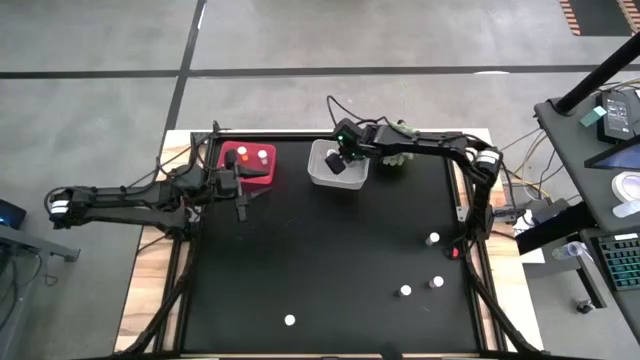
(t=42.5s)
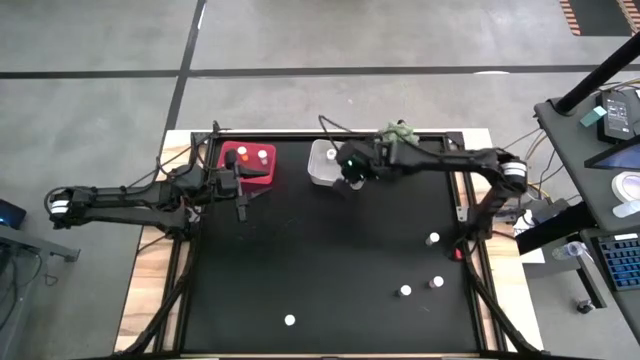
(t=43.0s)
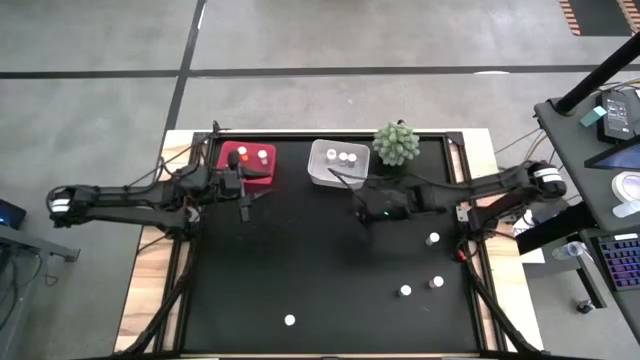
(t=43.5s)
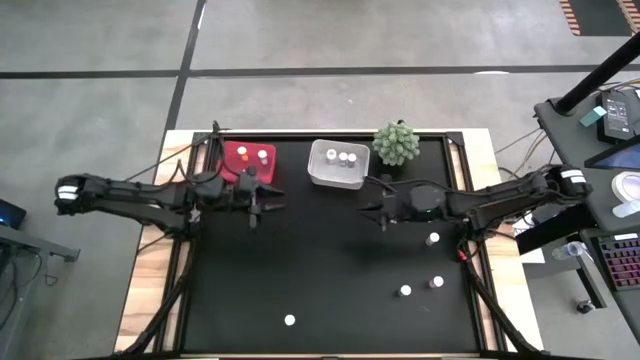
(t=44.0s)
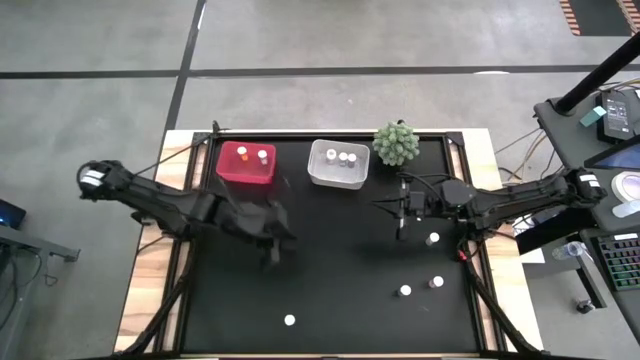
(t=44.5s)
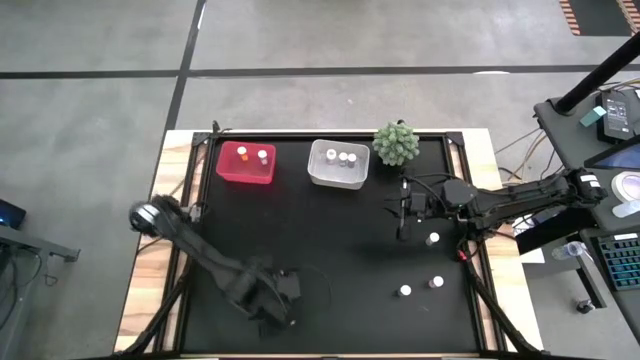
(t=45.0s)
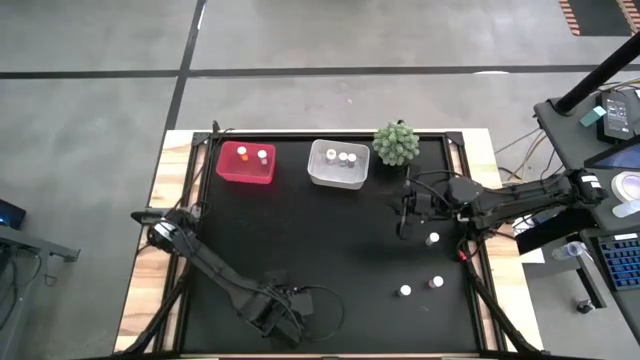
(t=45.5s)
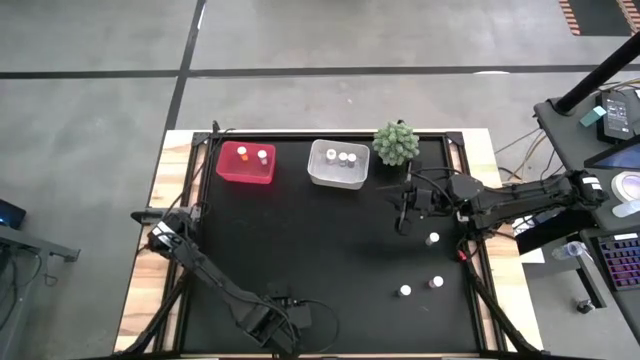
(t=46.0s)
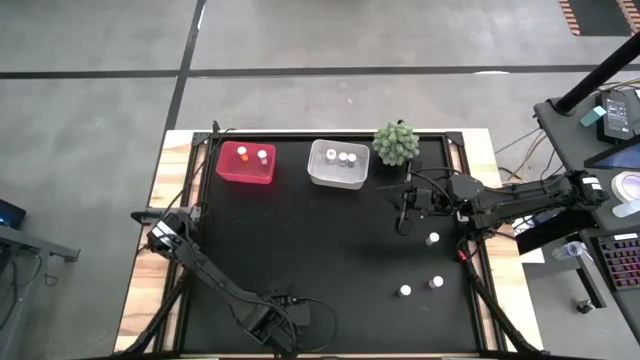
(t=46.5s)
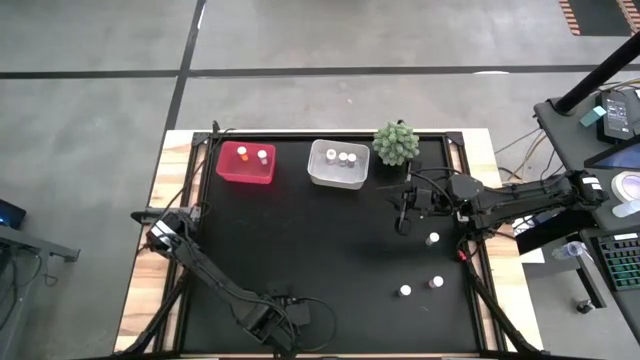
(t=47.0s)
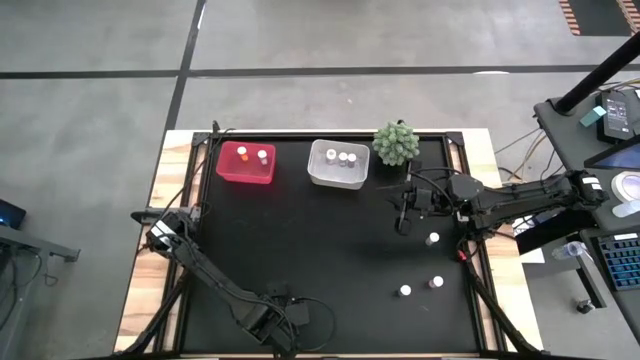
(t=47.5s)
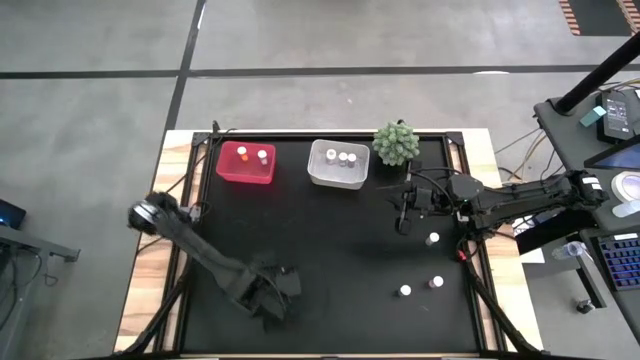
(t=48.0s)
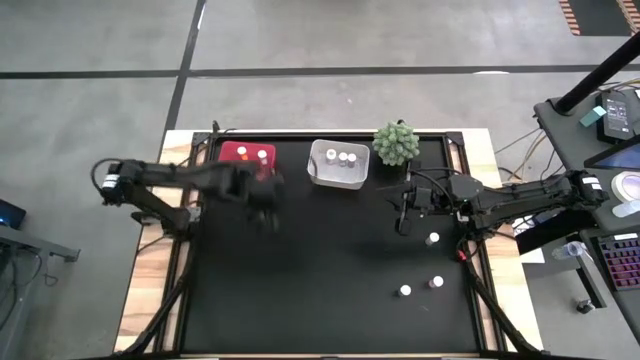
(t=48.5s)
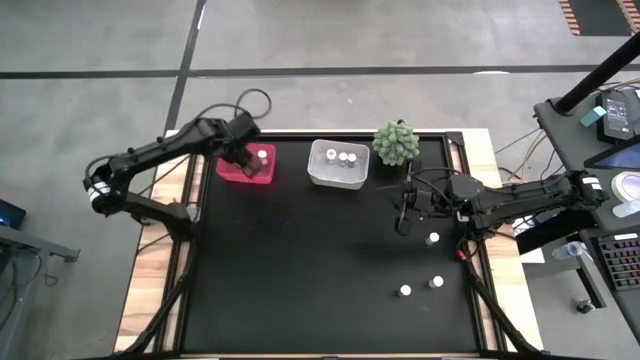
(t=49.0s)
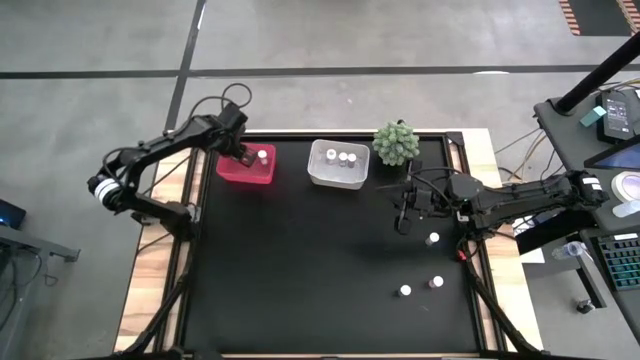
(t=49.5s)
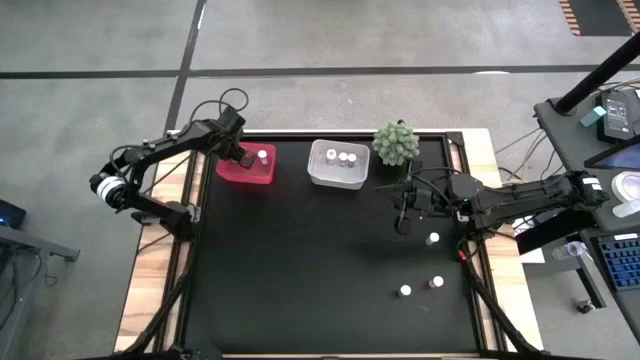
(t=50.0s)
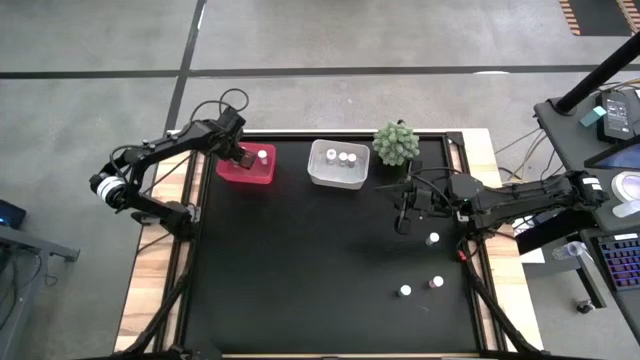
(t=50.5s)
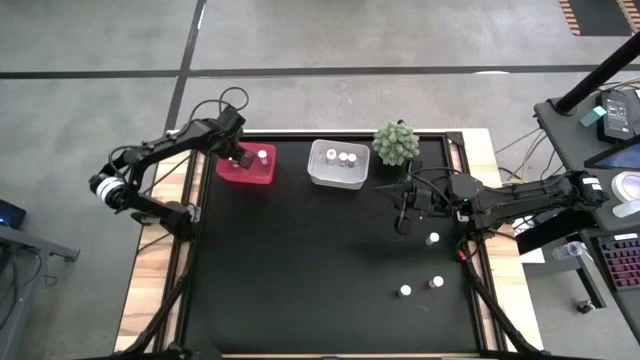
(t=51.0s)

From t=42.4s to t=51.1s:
Task: Pick and place medicine bottles into bin by pill shape (circle, oval)
Put the blue tablet bottle into the pink bin

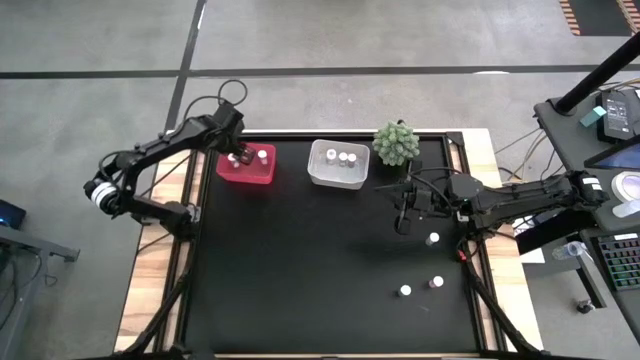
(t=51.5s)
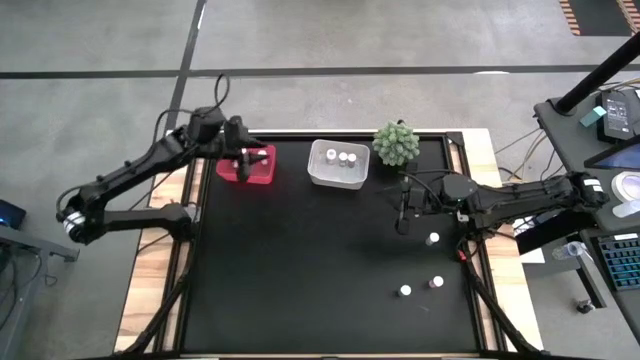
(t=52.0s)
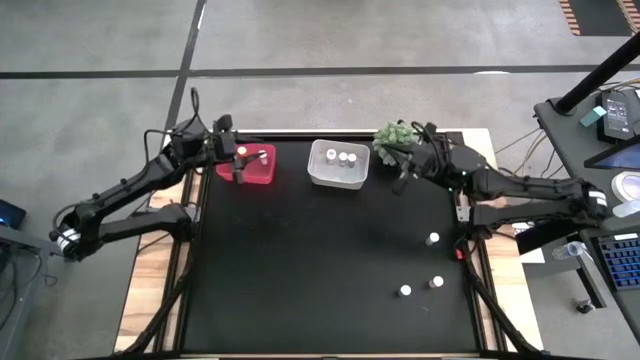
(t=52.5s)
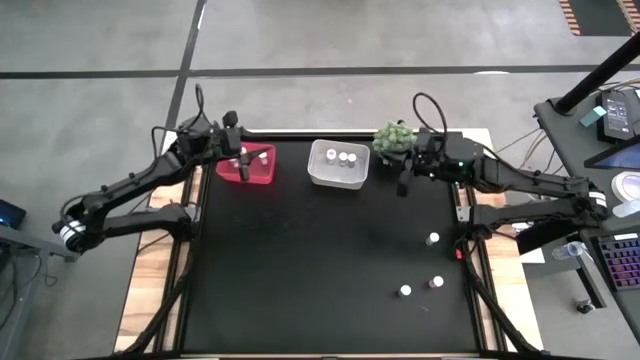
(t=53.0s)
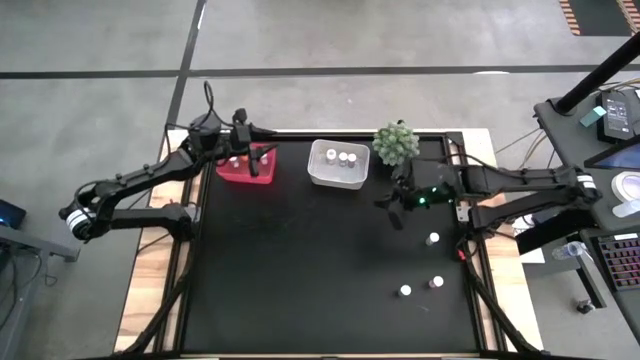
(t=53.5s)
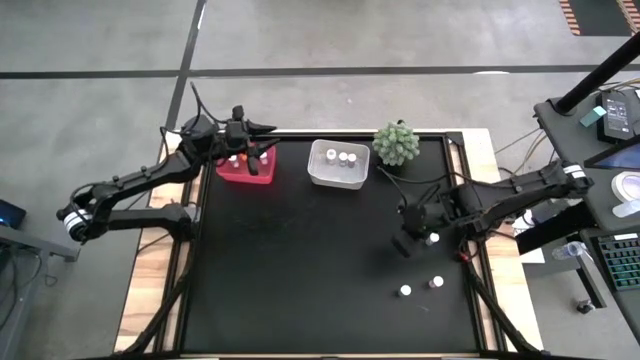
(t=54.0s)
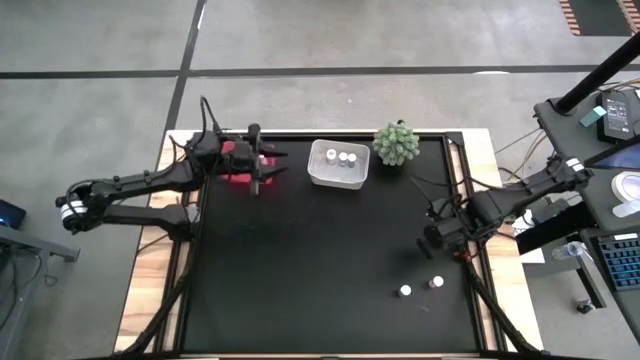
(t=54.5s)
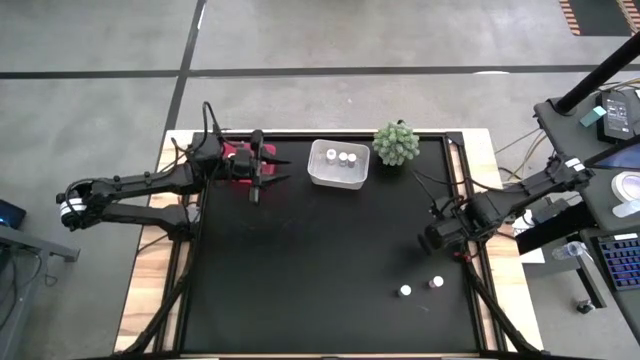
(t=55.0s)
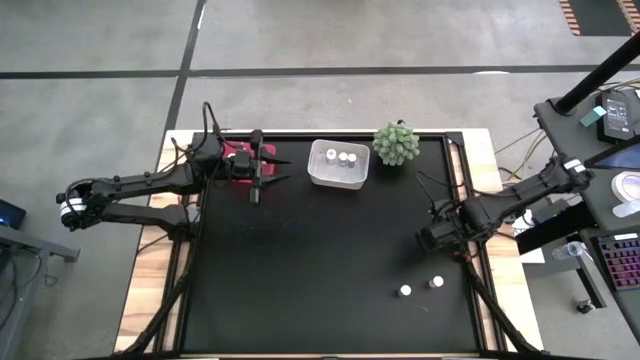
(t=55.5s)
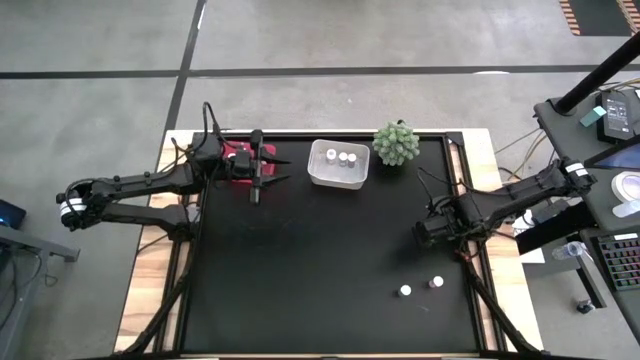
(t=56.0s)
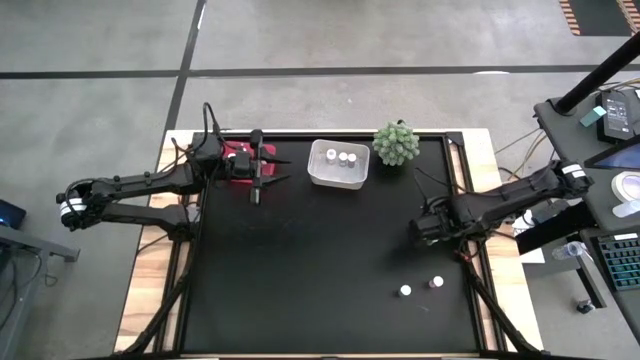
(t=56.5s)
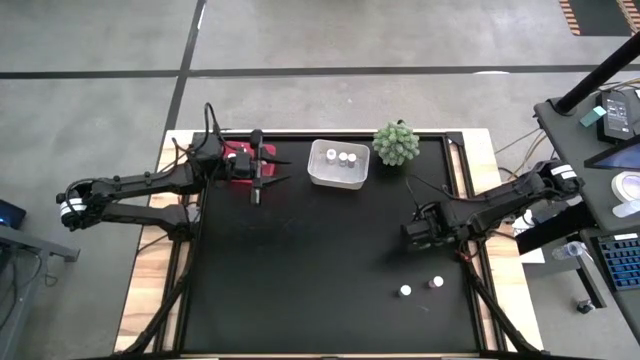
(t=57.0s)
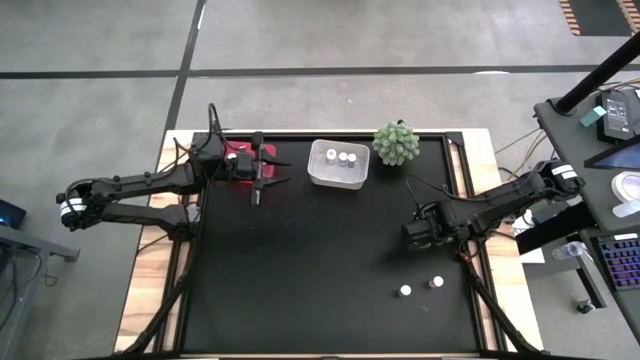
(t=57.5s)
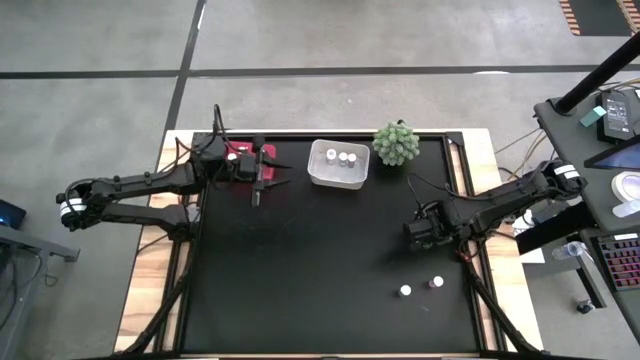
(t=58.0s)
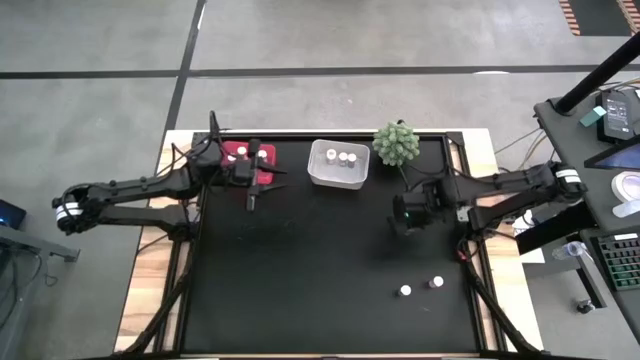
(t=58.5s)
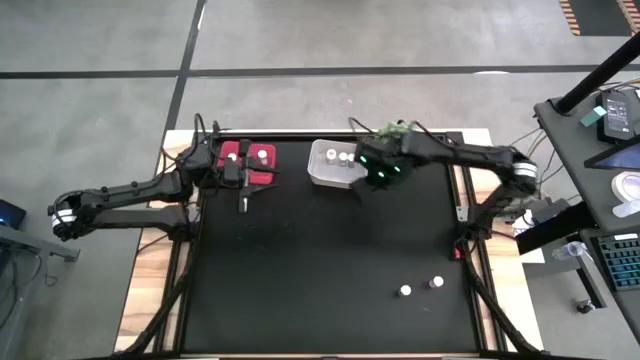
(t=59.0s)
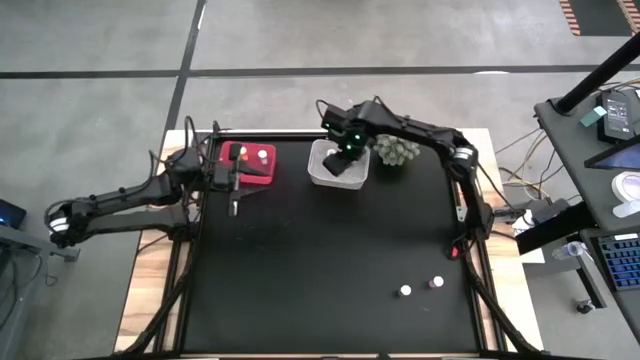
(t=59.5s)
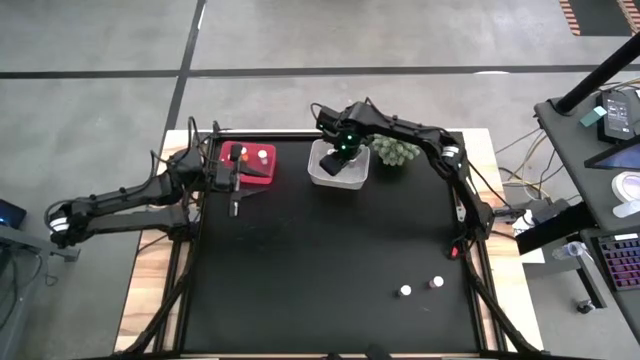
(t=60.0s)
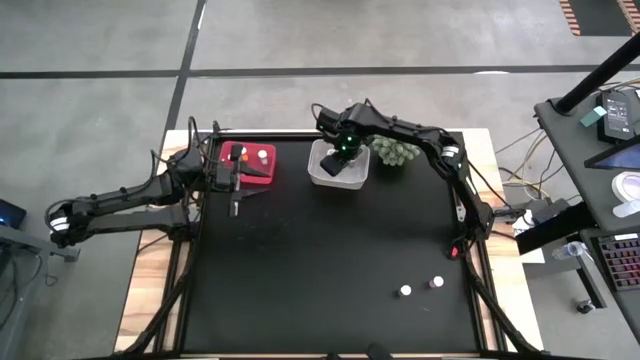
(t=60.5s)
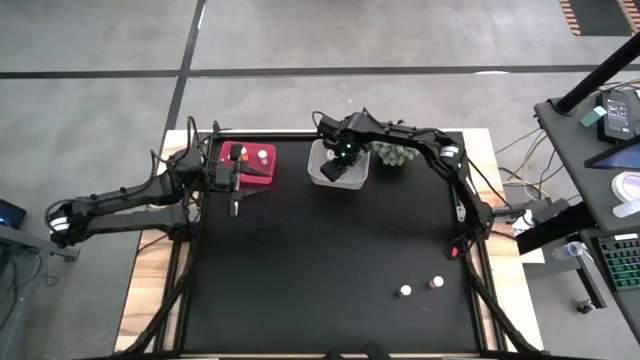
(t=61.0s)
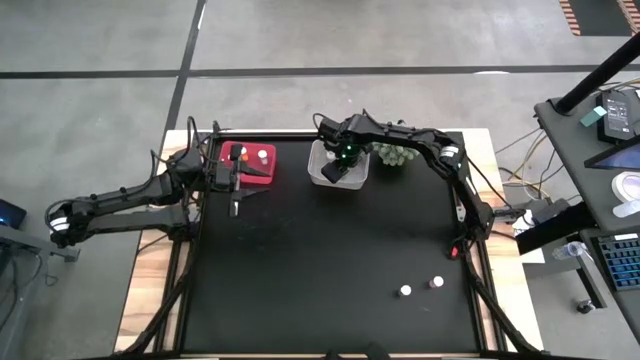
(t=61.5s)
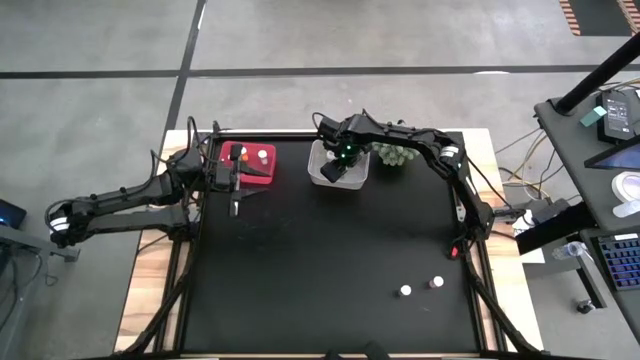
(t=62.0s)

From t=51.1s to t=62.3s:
Put the blue capsule bottle into the white bin

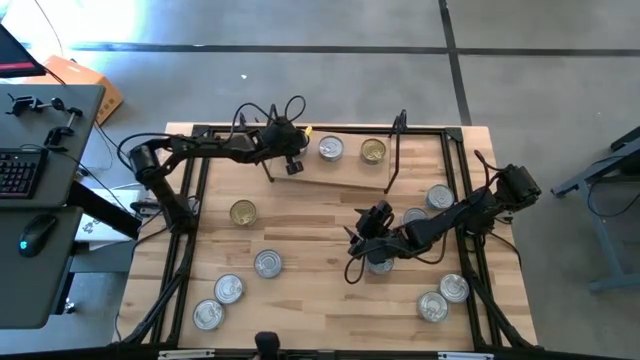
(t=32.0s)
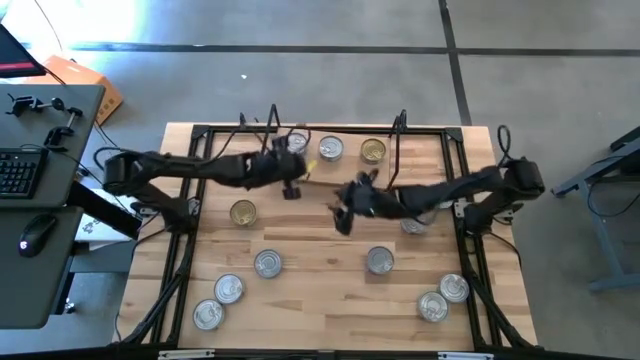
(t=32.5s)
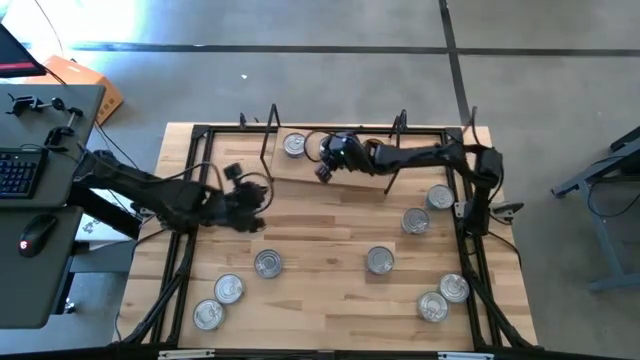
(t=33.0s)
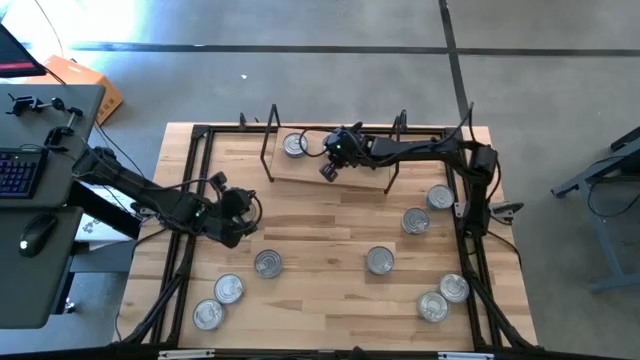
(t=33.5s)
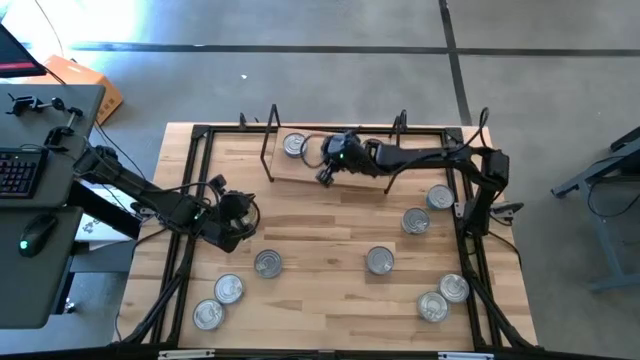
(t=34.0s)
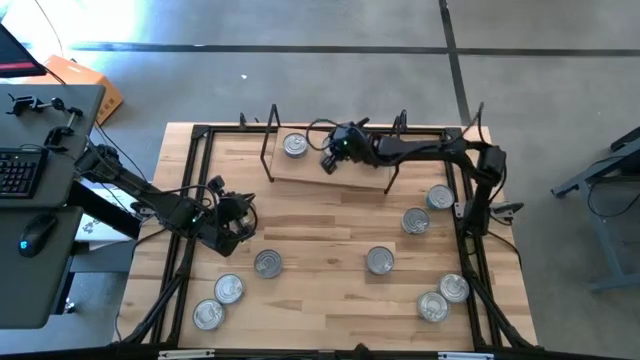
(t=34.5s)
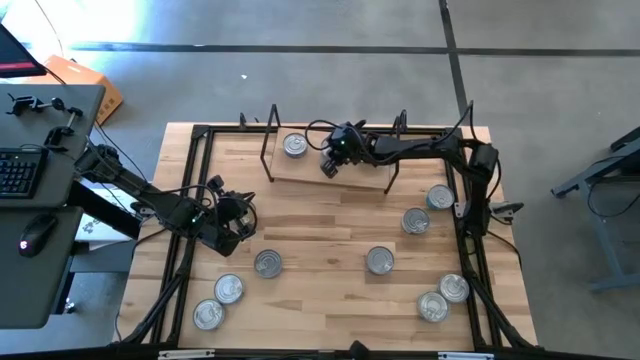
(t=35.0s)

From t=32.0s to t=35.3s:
Task: Stack canned seafood by type on shelf
Adjust the yellow-blue tuna can on the shelf
